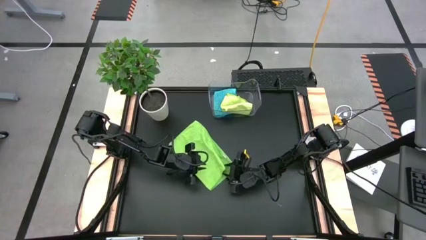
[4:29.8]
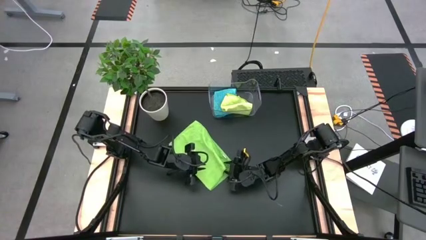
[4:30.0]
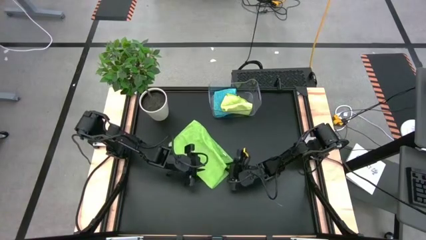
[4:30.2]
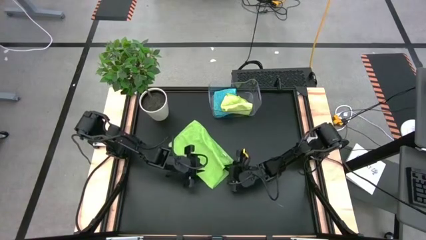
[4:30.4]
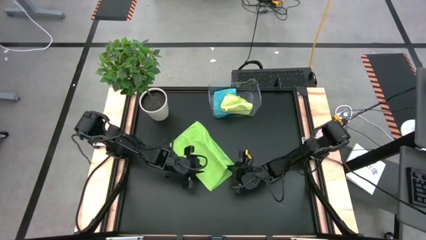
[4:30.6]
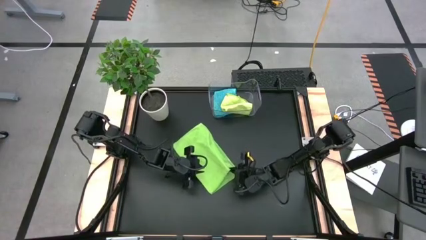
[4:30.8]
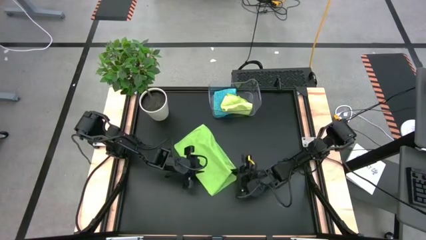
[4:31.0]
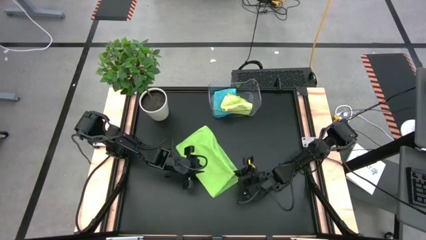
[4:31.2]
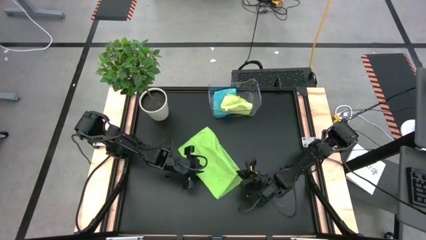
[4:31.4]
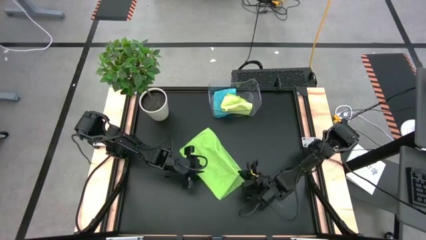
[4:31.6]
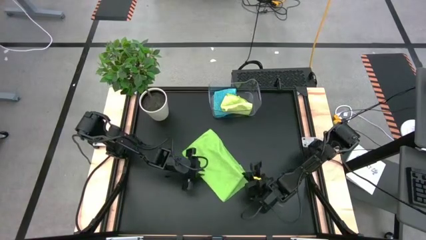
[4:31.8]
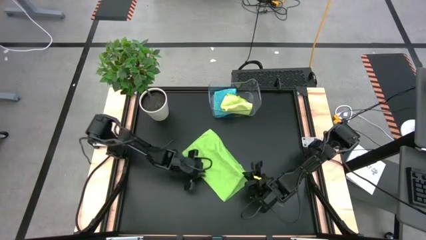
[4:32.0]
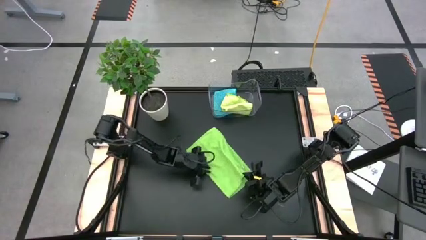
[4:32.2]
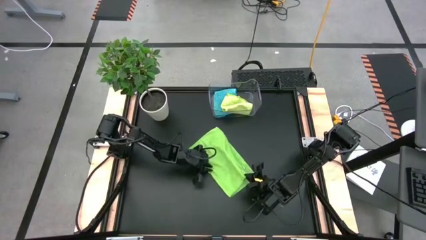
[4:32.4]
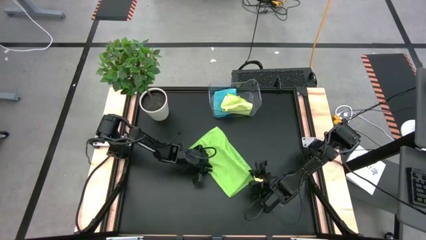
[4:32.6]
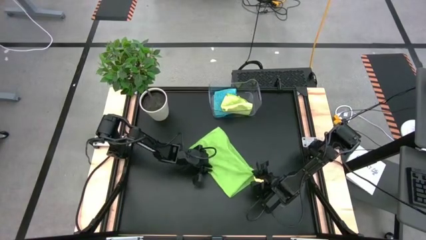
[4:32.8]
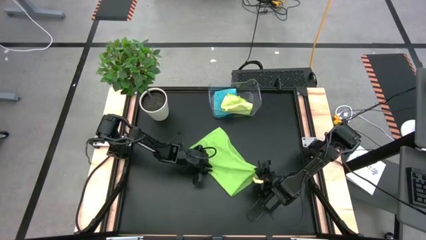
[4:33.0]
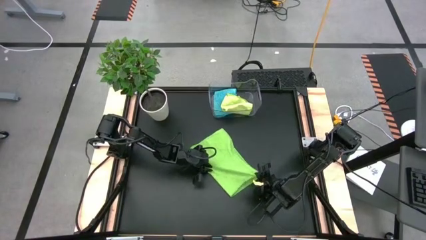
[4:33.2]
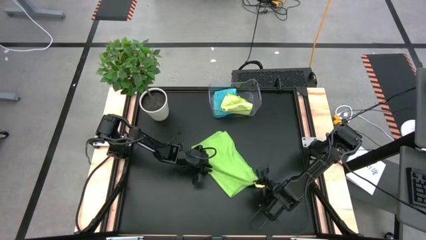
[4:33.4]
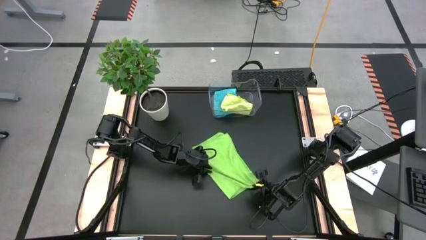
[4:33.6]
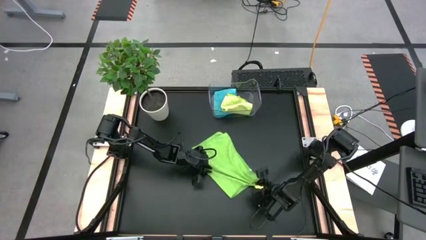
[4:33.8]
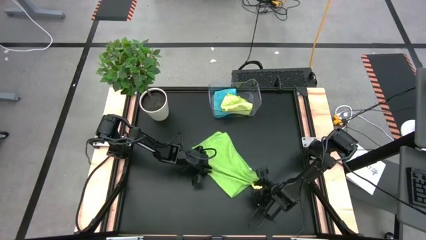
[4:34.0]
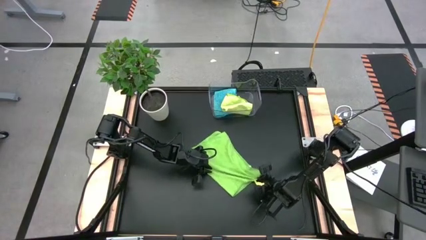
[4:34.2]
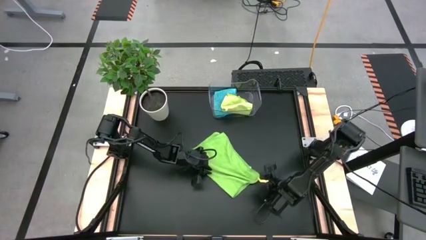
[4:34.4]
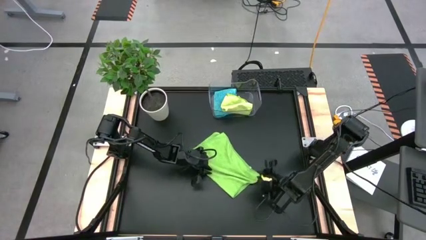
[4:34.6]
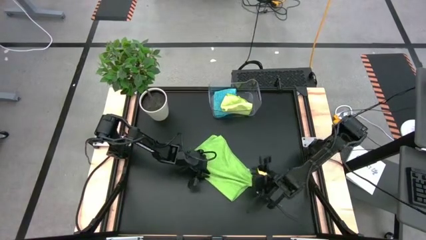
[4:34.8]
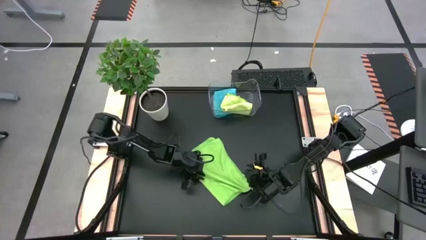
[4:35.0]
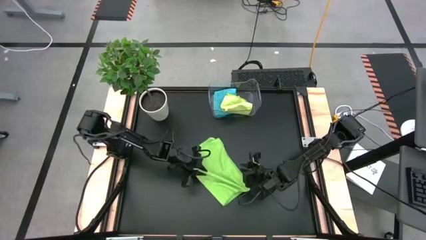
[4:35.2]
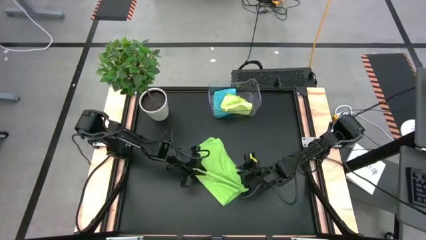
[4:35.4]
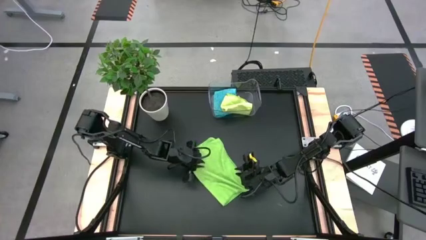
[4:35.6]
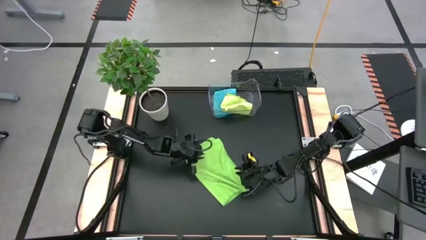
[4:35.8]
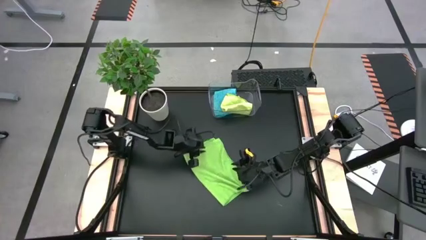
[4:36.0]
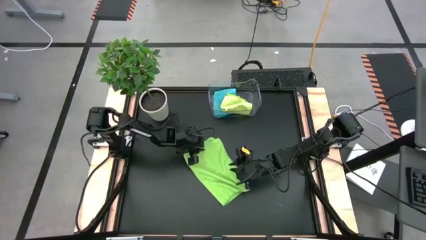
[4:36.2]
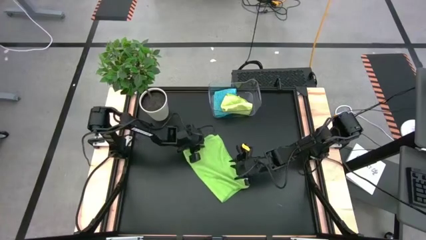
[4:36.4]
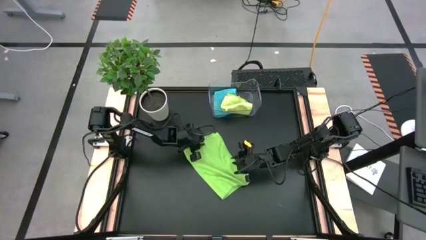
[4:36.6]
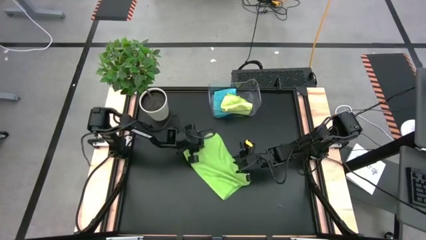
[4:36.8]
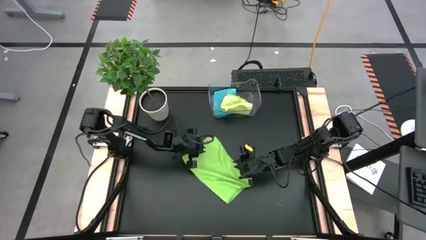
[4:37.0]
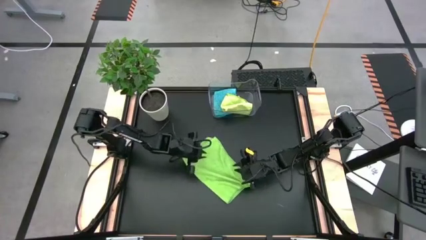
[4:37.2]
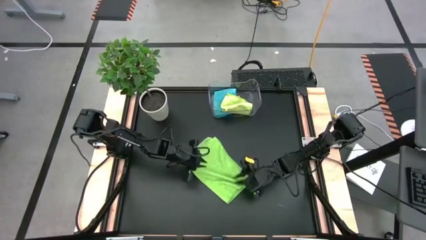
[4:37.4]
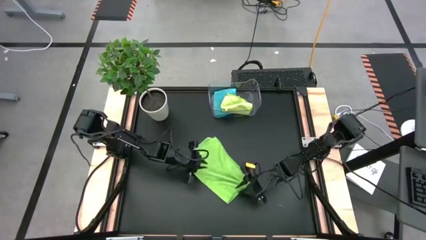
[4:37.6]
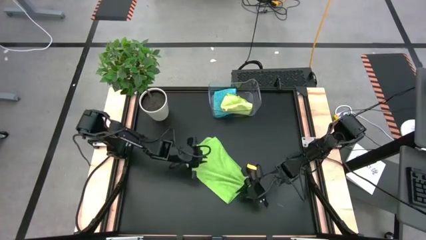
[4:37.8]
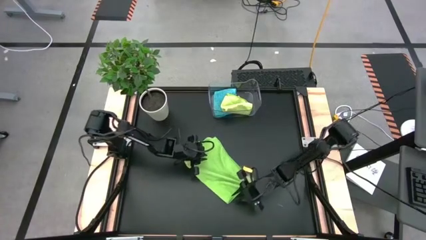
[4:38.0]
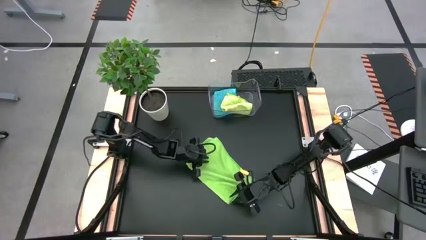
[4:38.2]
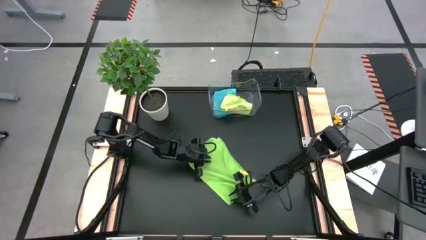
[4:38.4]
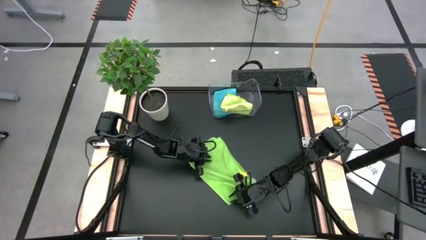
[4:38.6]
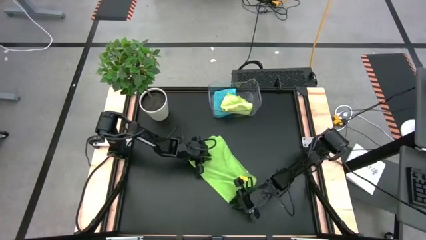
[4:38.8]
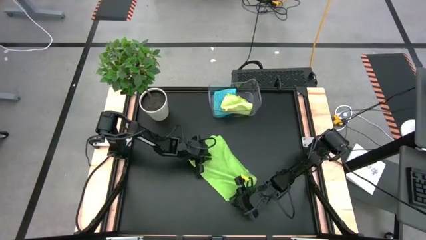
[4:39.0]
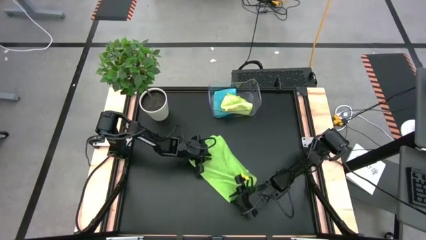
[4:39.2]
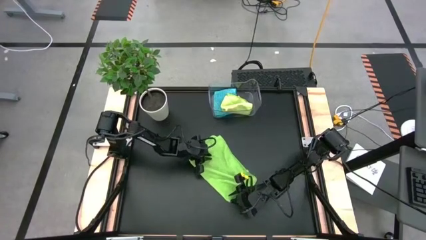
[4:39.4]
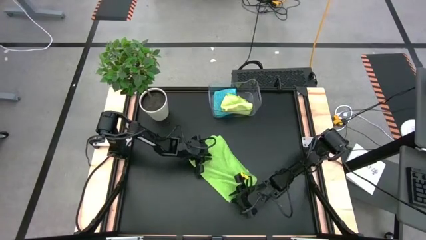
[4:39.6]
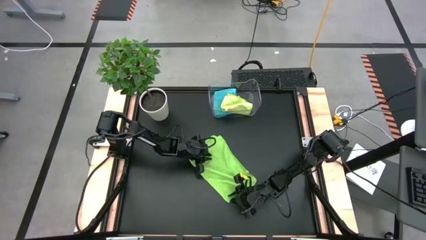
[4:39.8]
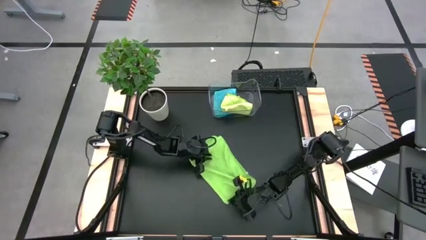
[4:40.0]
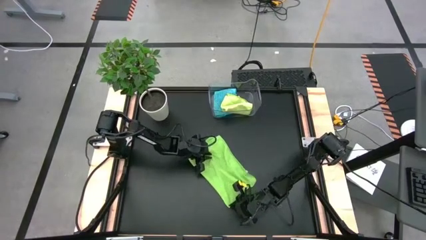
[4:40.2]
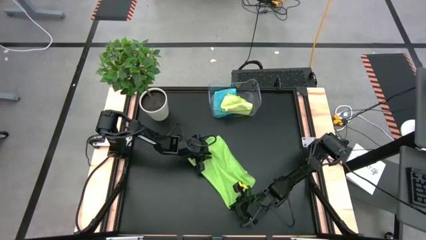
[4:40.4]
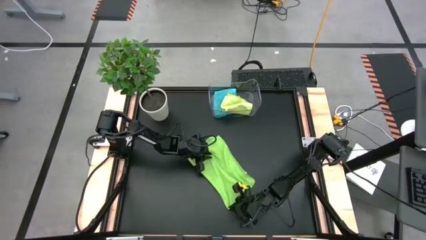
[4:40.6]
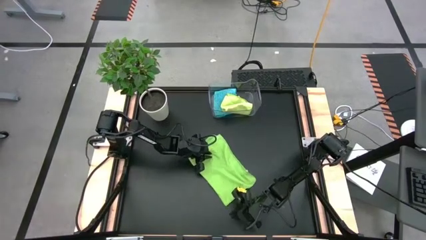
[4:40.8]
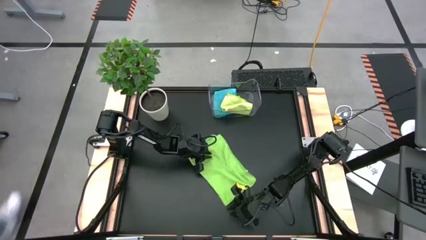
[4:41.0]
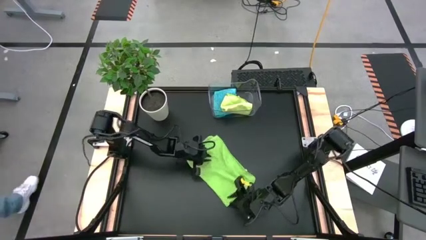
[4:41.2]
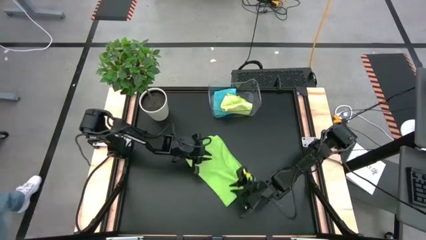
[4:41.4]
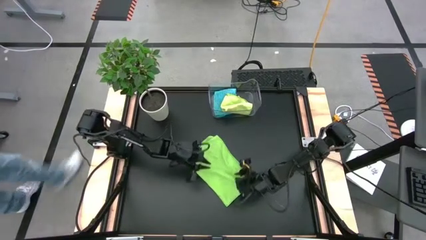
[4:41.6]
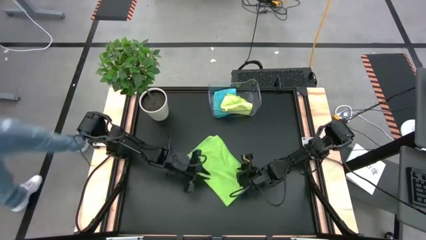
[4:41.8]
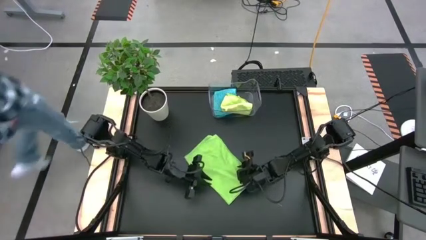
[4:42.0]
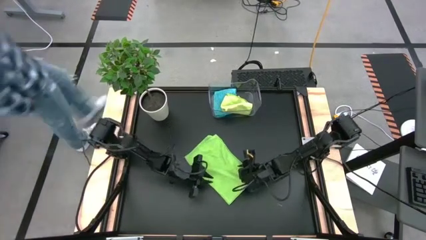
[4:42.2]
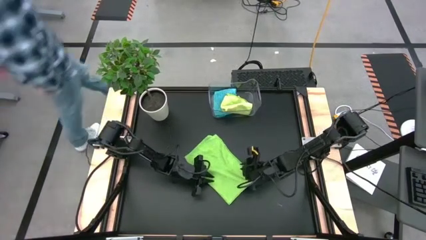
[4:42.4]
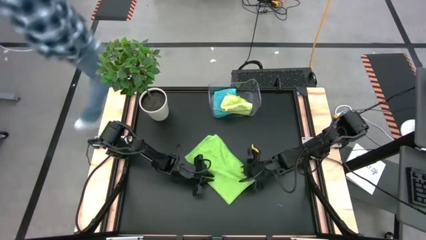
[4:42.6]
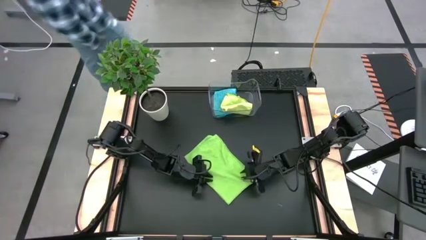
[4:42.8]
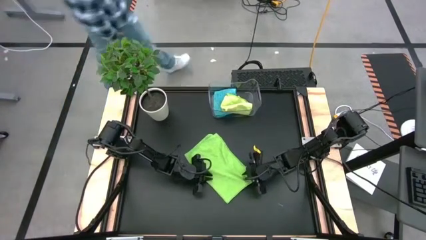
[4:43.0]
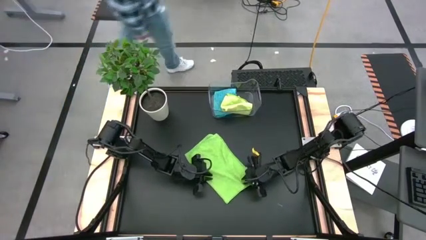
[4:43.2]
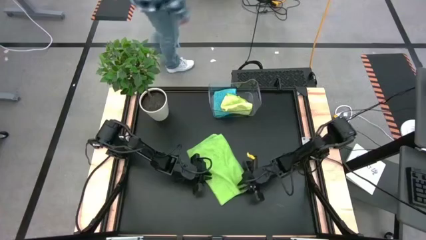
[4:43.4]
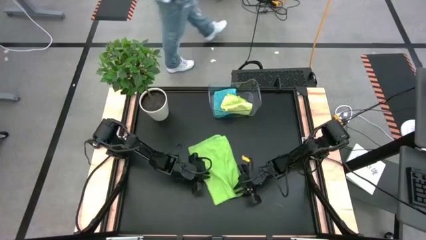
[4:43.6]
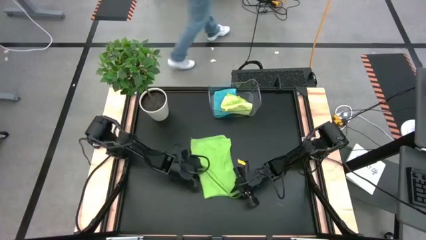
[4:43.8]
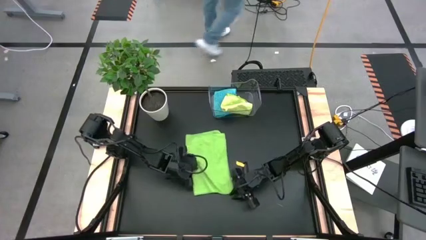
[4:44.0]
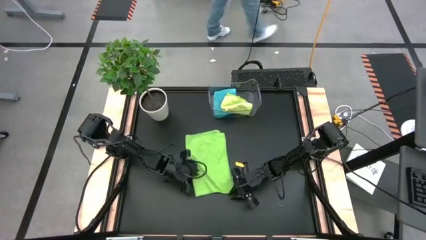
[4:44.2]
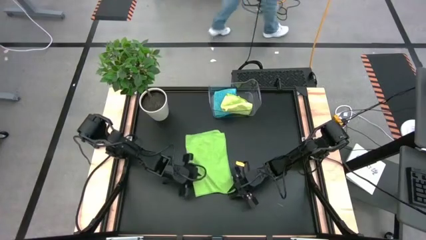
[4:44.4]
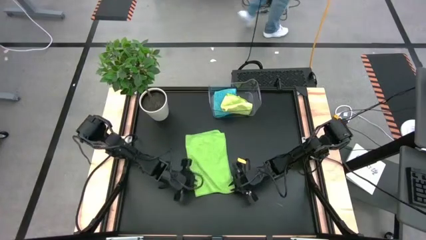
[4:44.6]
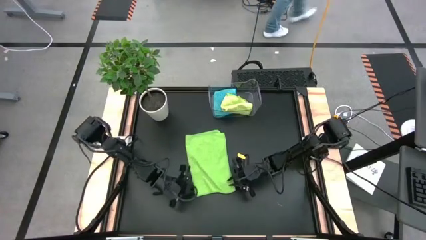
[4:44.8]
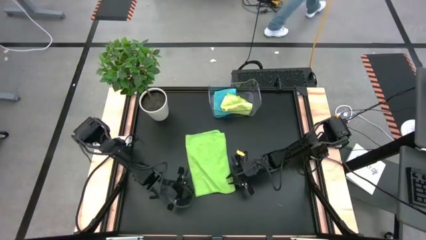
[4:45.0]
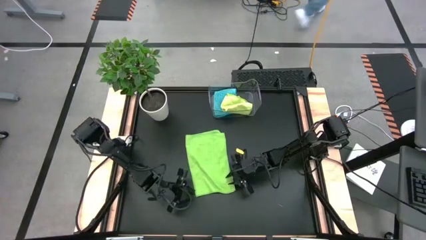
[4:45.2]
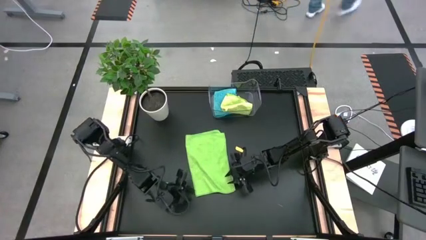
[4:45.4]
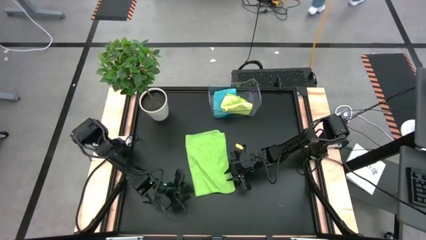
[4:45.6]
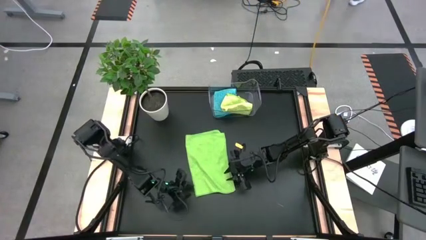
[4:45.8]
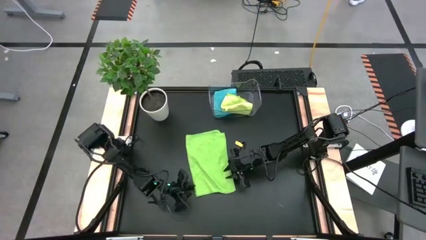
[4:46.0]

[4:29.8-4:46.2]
Task: Fold microfiber towels
Fold the green microfiber cloth
